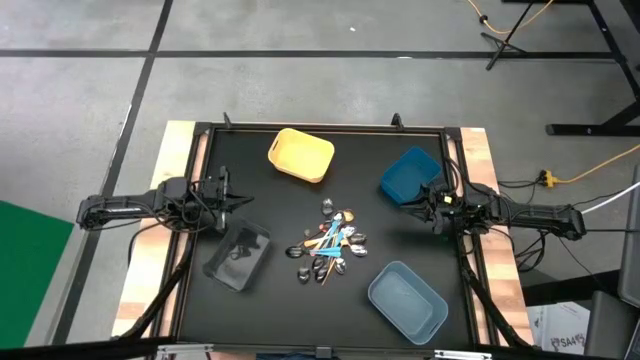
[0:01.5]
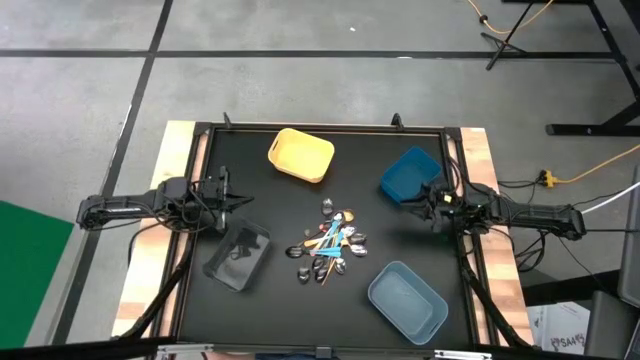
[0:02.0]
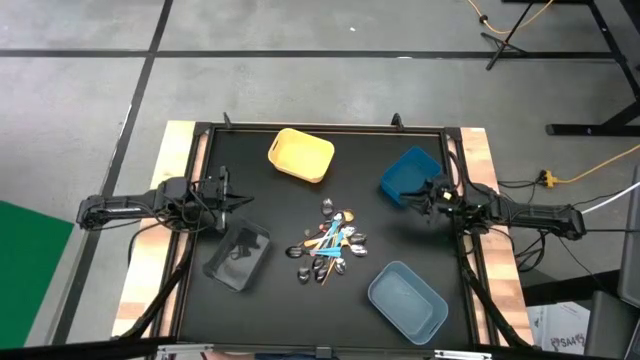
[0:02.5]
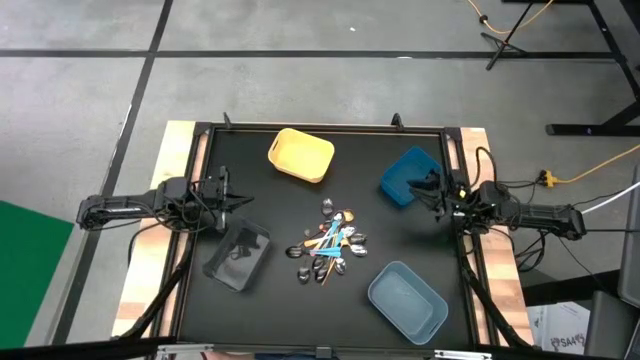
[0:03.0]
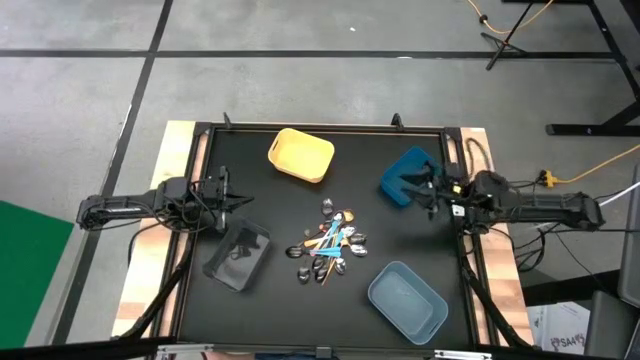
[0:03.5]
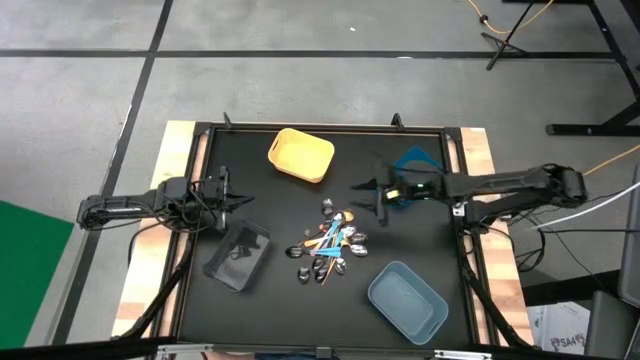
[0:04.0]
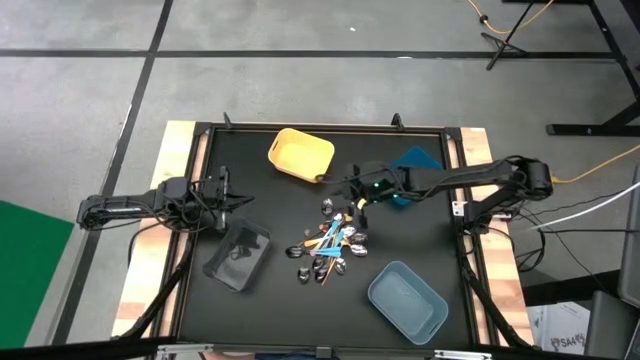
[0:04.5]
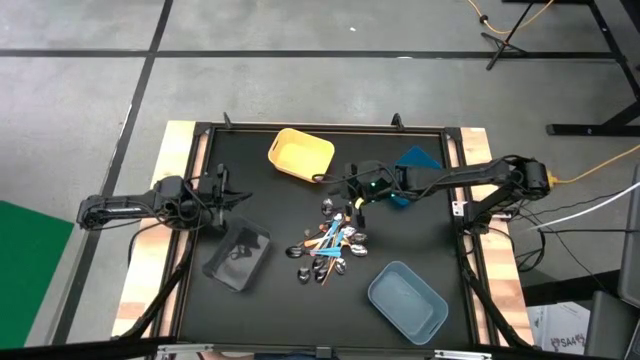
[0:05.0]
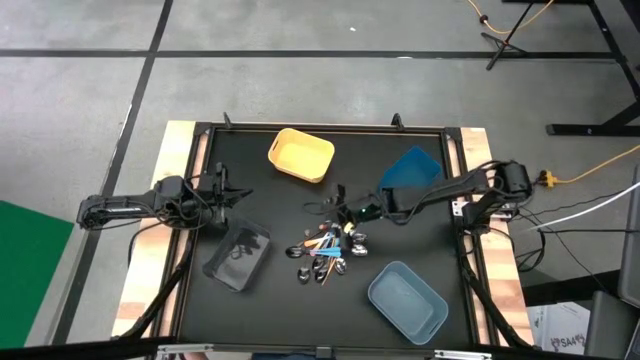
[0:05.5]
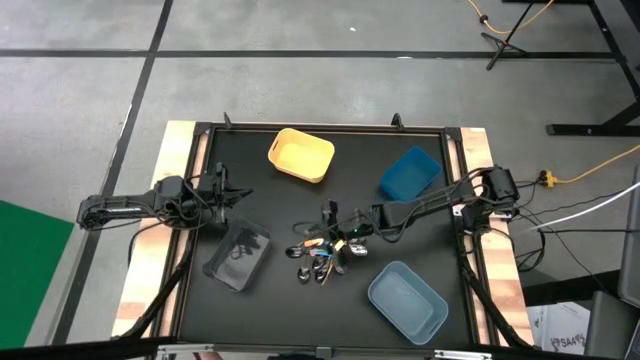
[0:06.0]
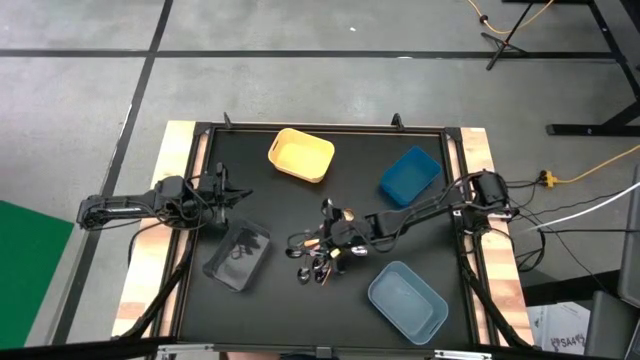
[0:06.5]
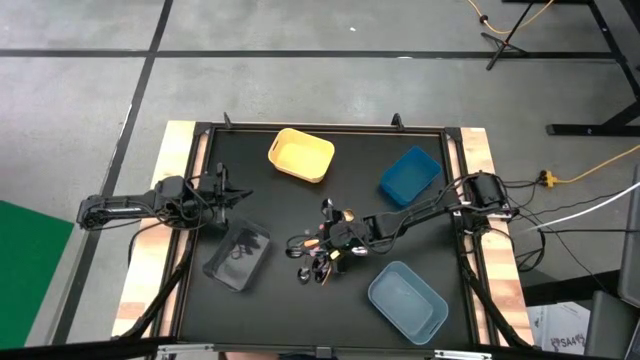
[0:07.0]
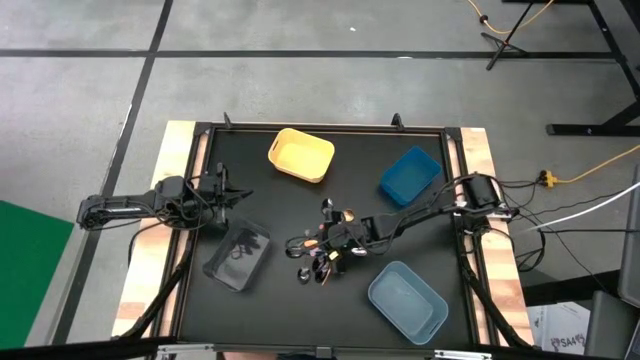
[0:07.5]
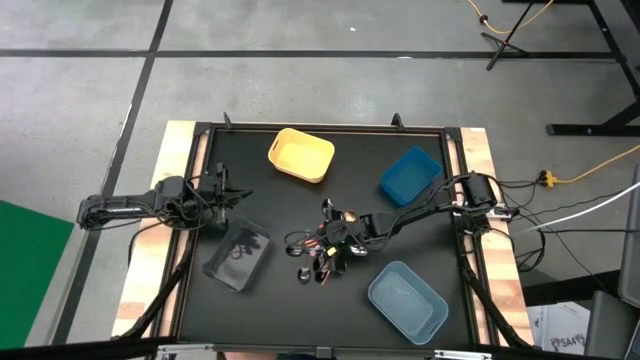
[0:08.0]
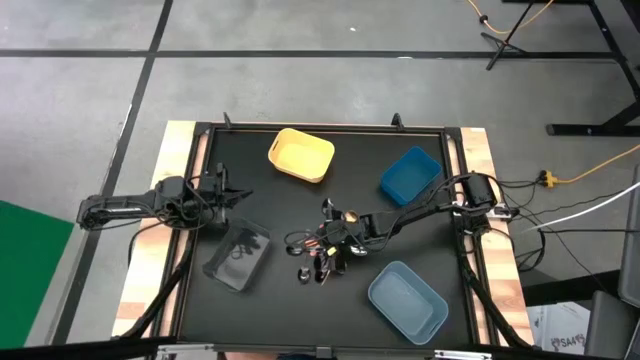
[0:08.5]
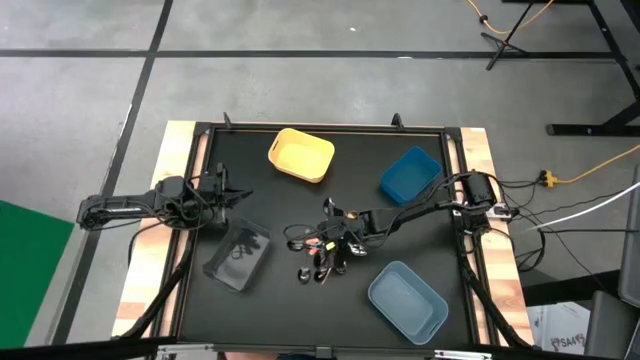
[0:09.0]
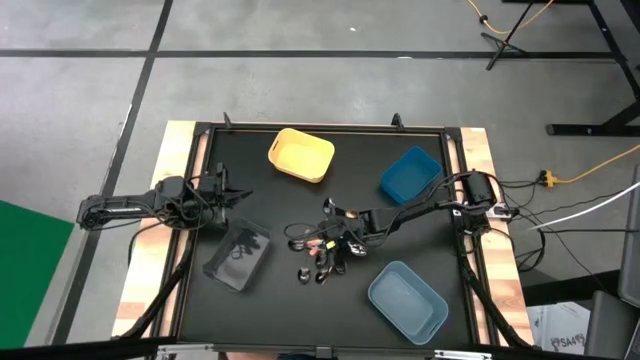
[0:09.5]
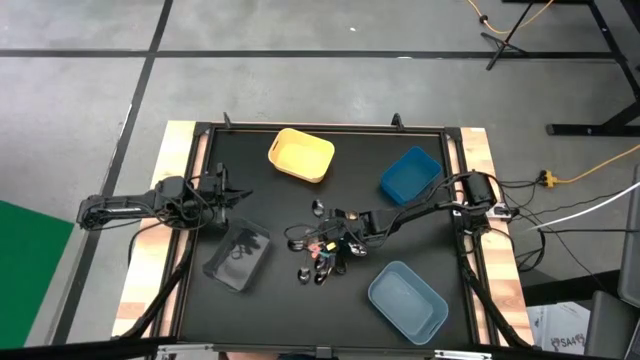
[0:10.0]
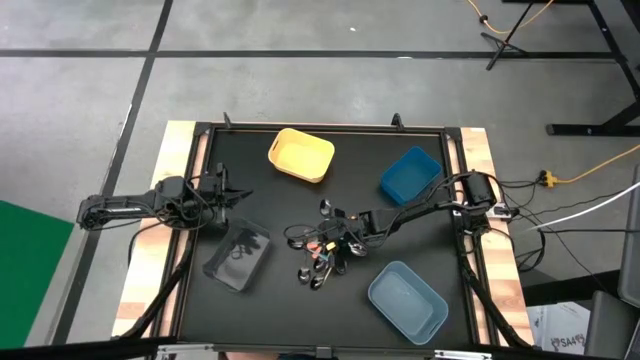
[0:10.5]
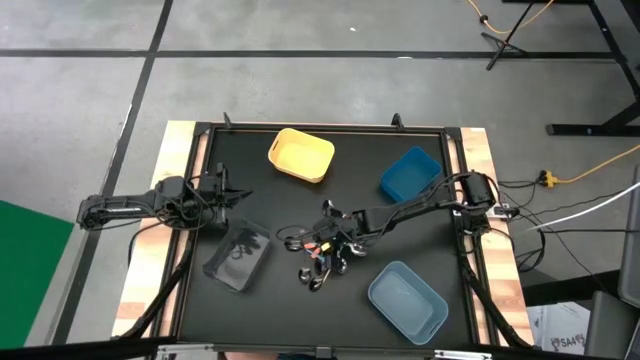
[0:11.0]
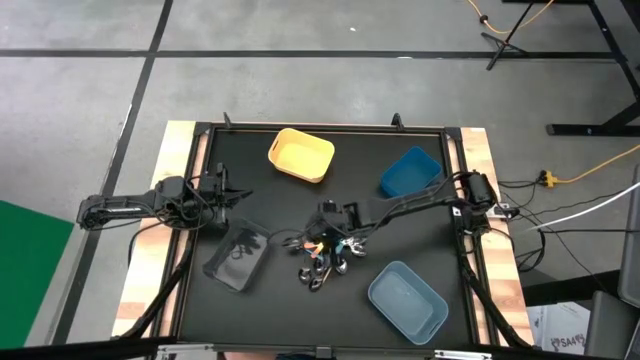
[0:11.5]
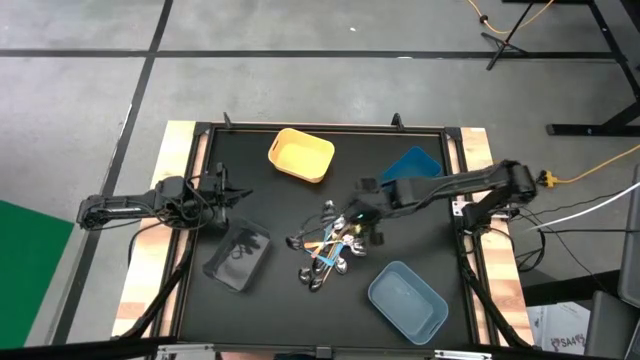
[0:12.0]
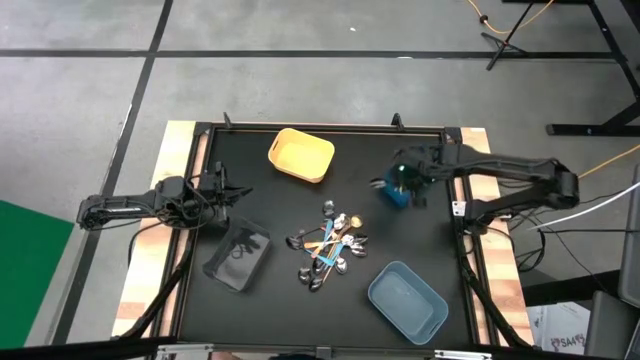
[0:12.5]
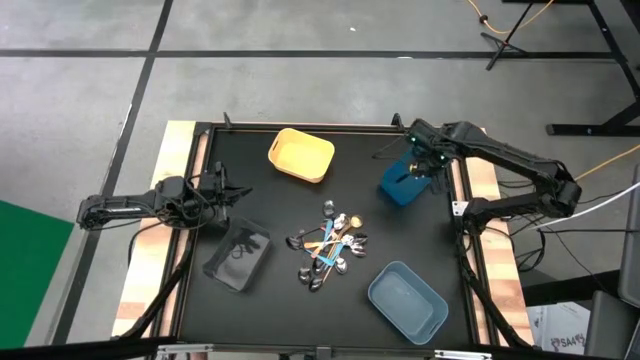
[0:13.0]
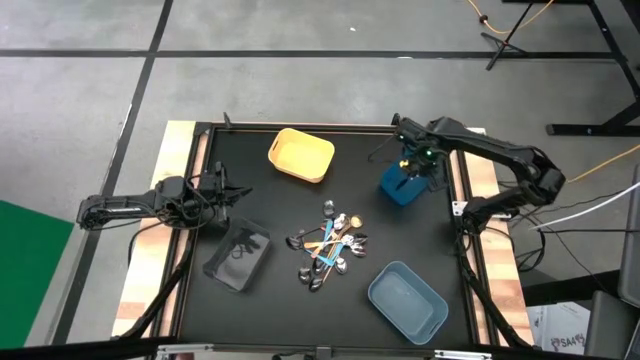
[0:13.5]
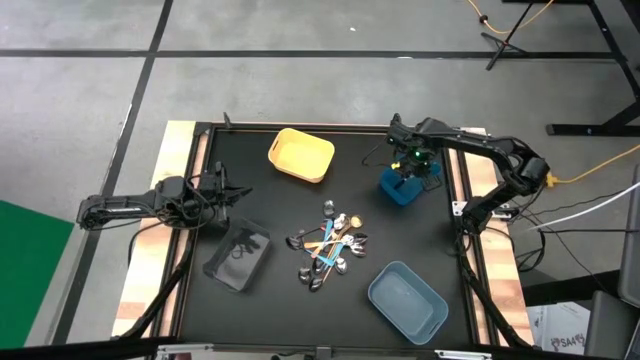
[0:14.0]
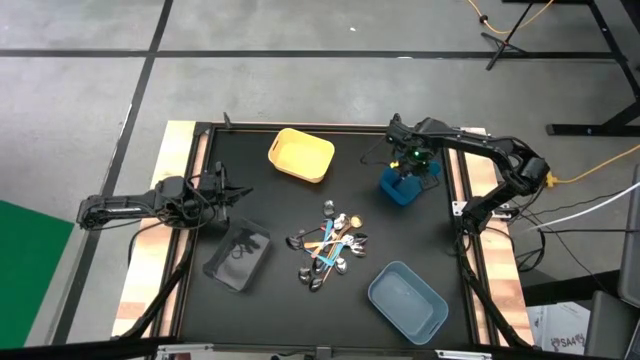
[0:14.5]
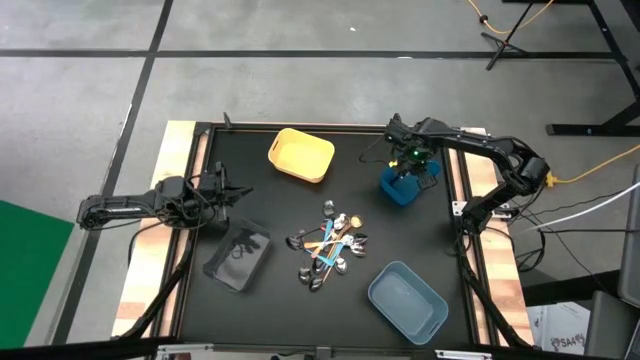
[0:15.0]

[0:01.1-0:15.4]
Task: Sort silverware by color (type)
Put the light blue spoon into the blue bin

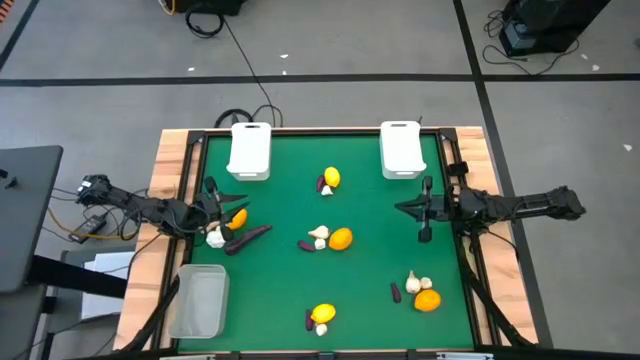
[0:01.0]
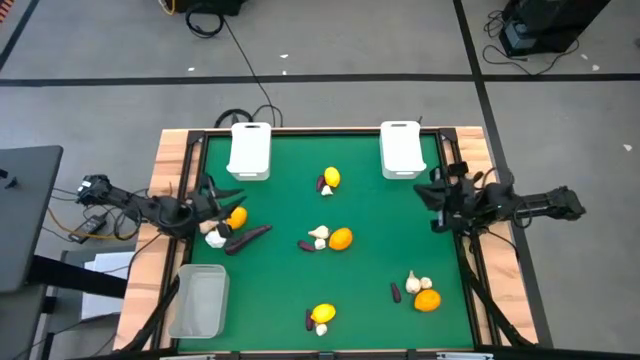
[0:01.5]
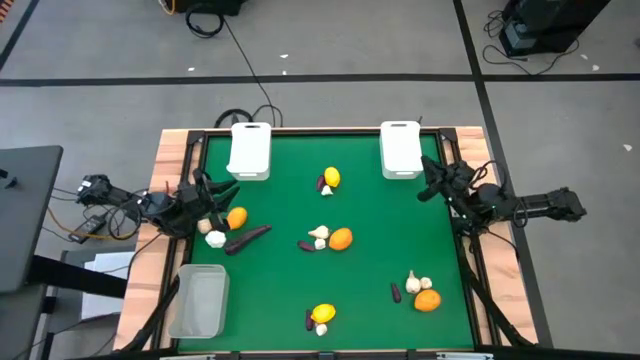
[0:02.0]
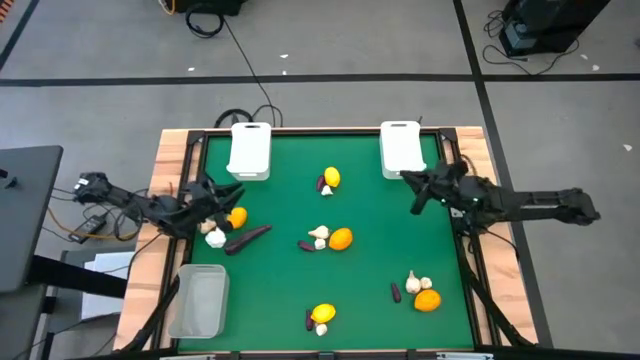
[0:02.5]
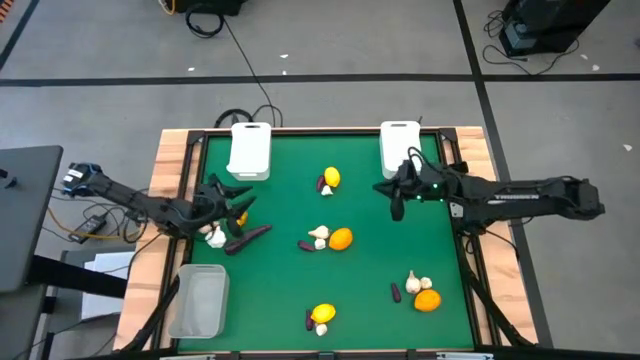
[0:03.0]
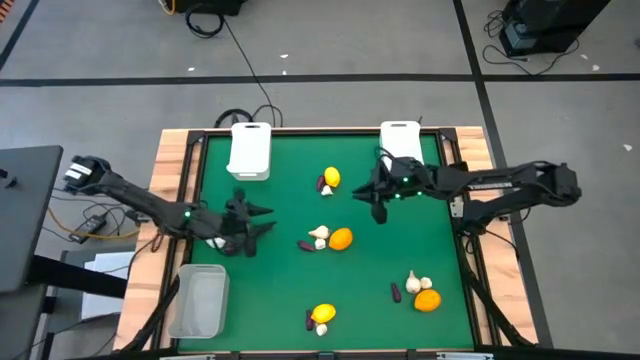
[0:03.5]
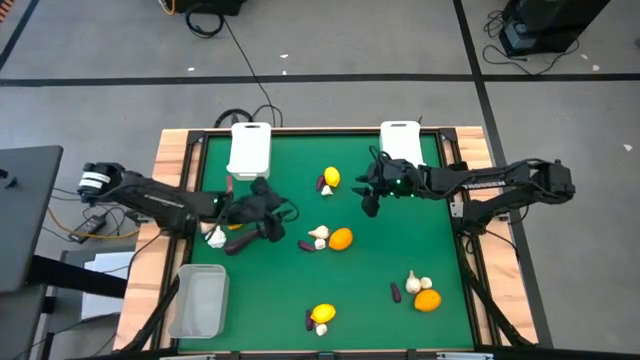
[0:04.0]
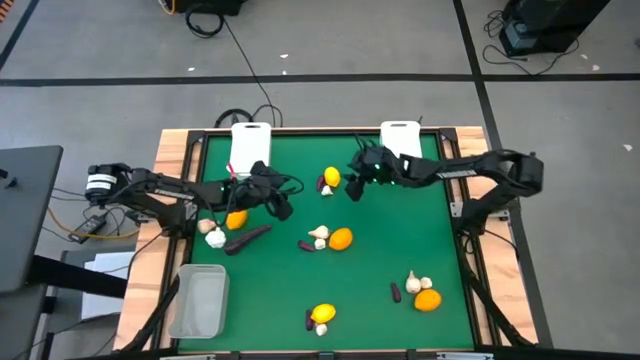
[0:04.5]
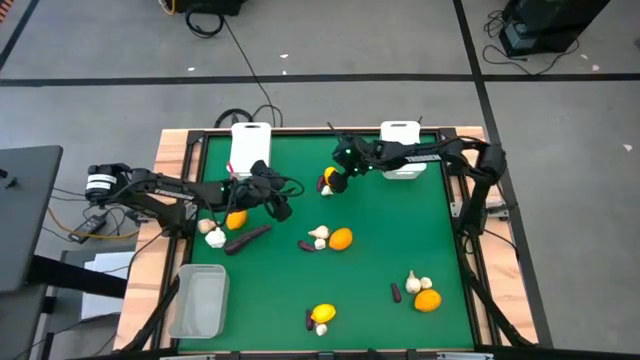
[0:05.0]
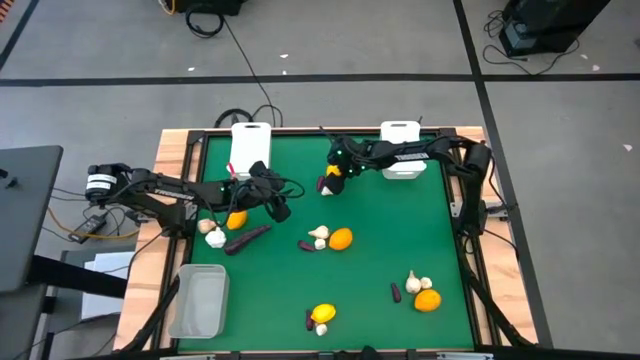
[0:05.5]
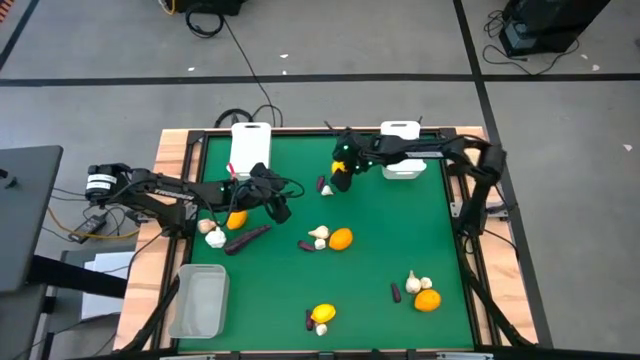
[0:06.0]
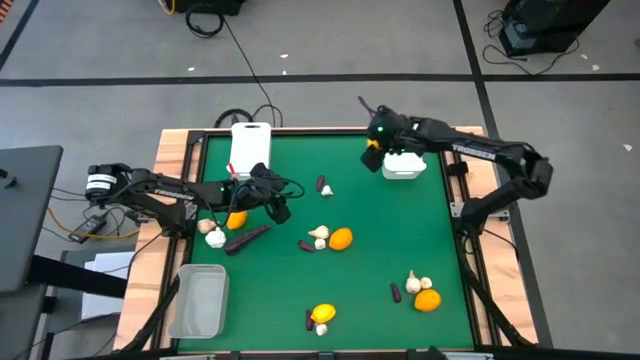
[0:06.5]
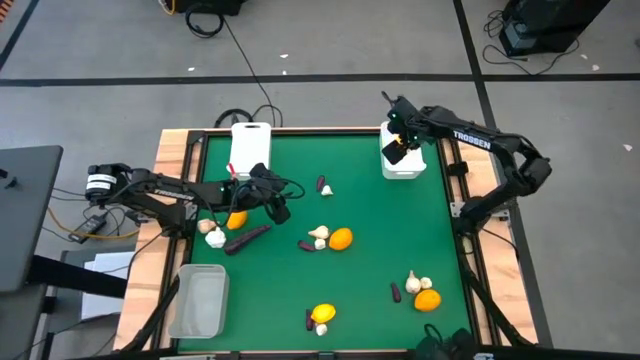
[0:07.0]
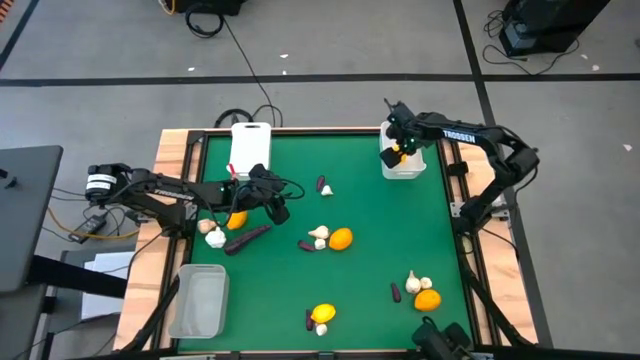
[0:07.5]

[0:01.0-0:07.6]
Task: Sort produce into baskets
Put the top lemon into the right white bin
